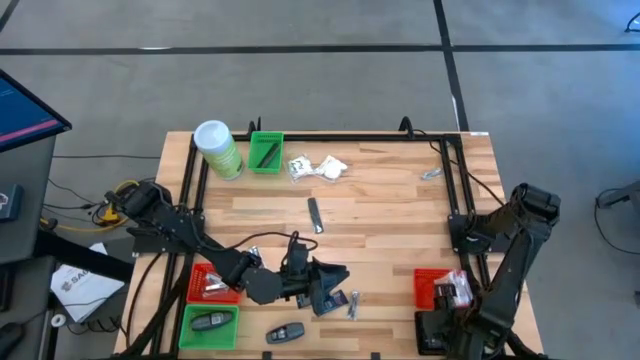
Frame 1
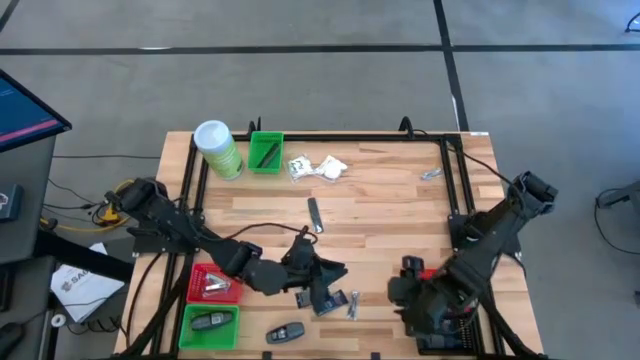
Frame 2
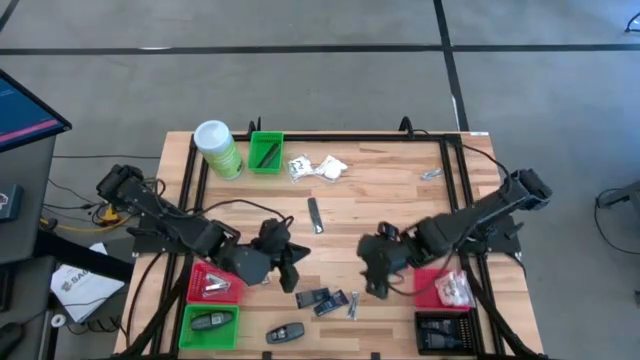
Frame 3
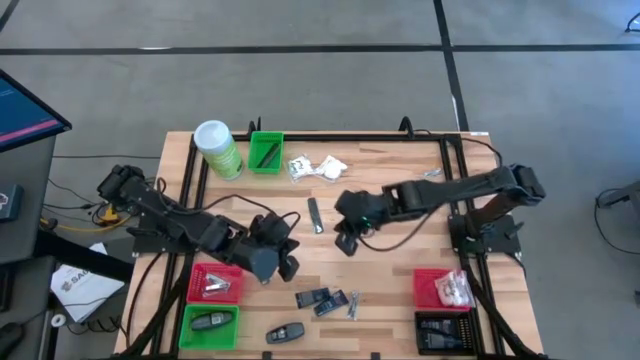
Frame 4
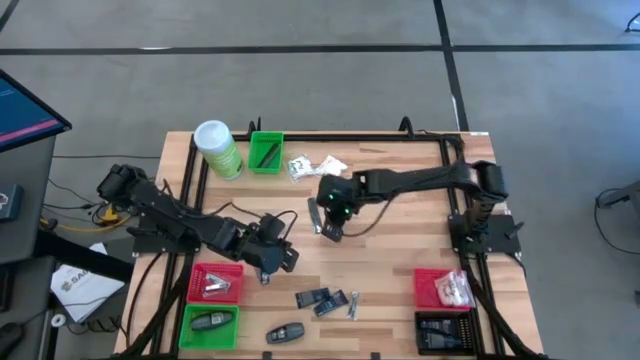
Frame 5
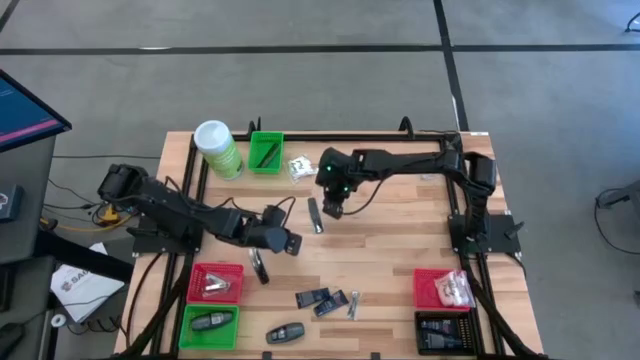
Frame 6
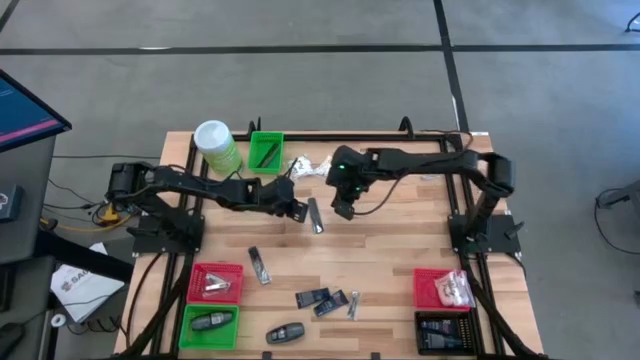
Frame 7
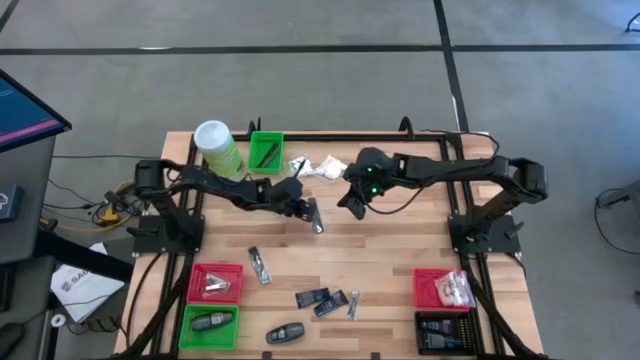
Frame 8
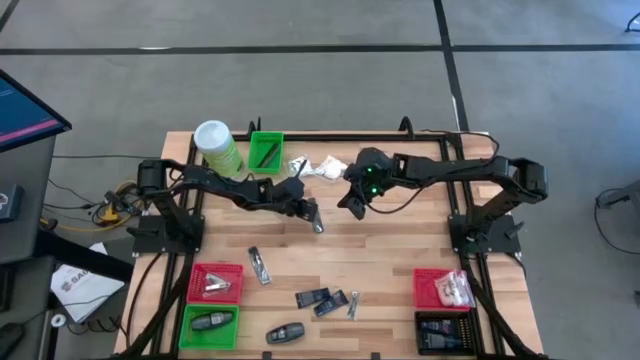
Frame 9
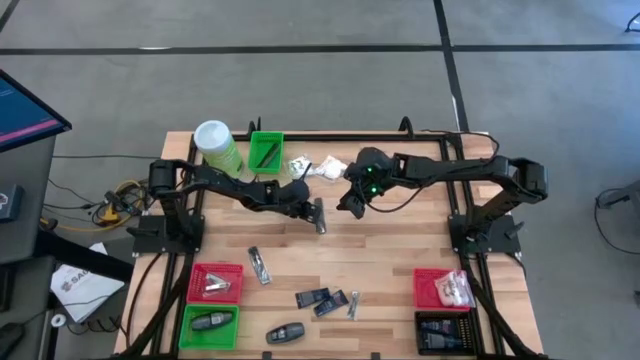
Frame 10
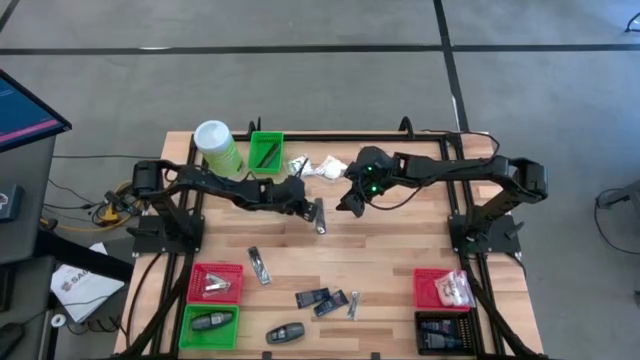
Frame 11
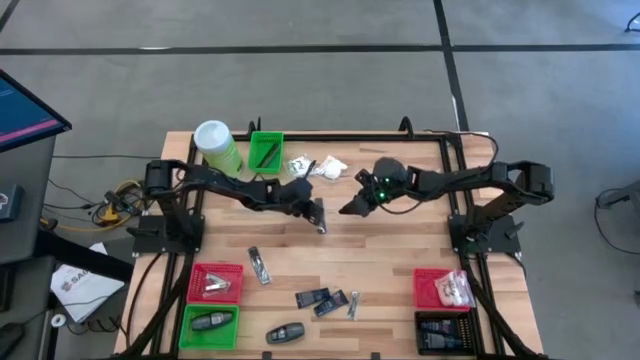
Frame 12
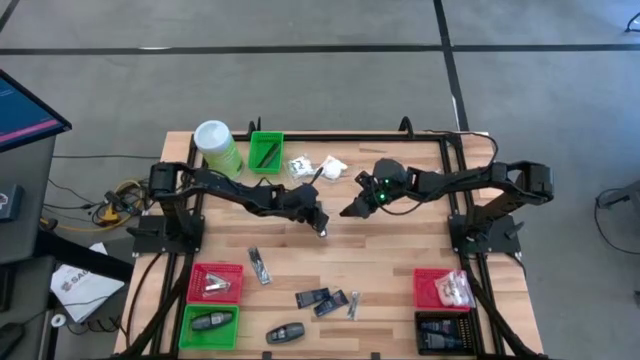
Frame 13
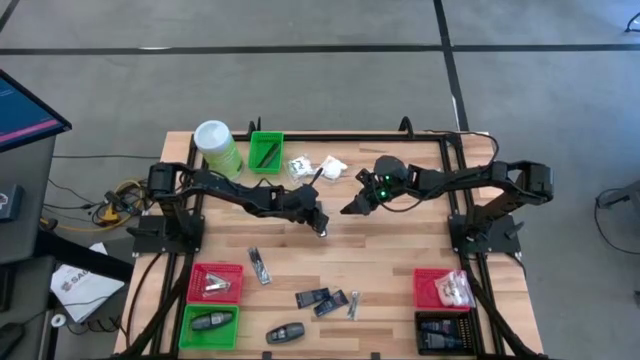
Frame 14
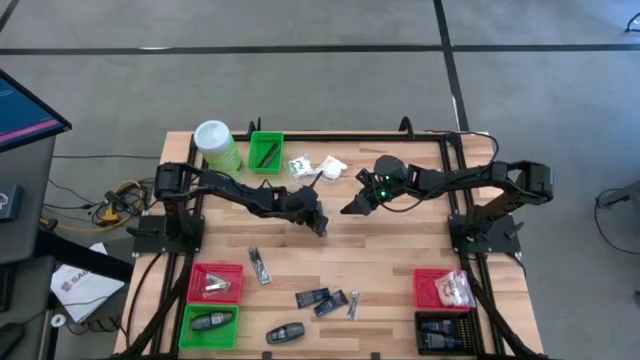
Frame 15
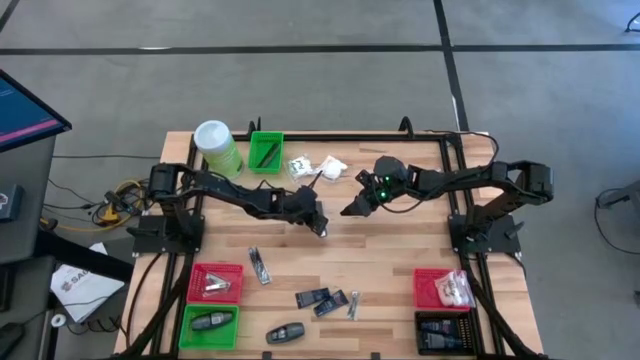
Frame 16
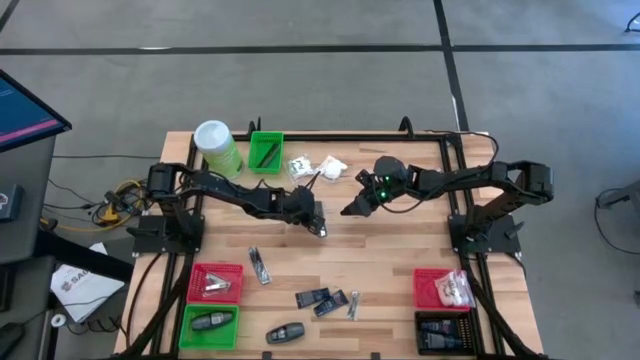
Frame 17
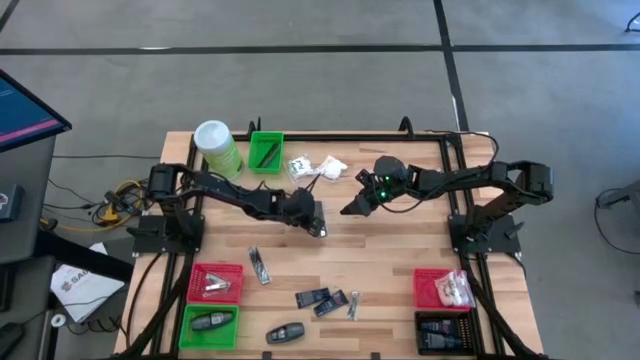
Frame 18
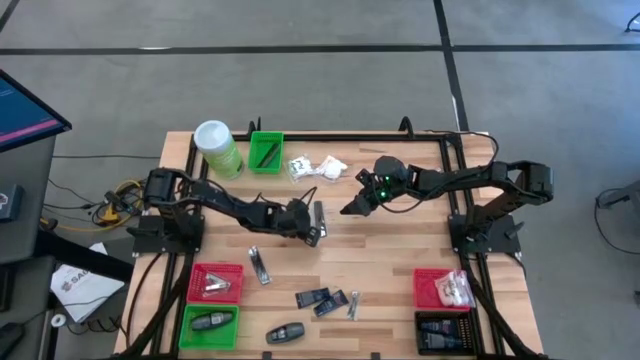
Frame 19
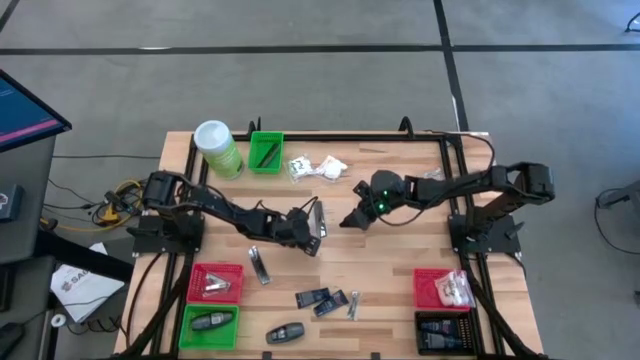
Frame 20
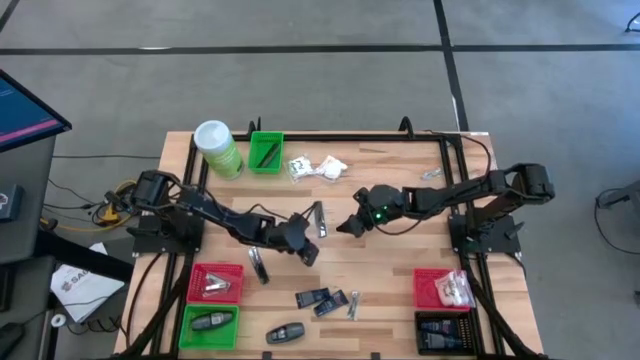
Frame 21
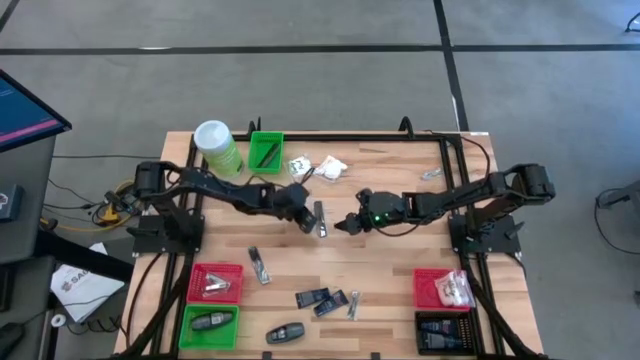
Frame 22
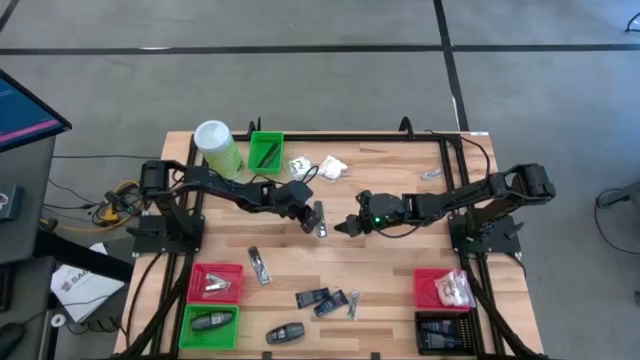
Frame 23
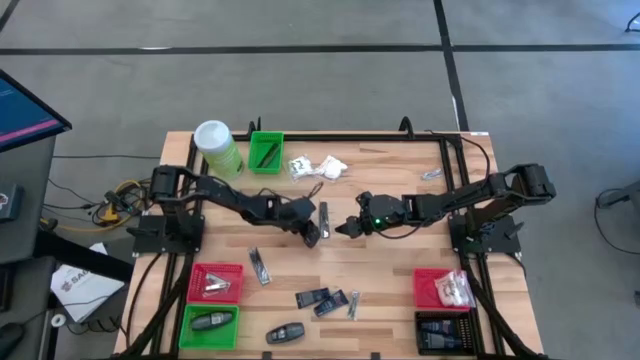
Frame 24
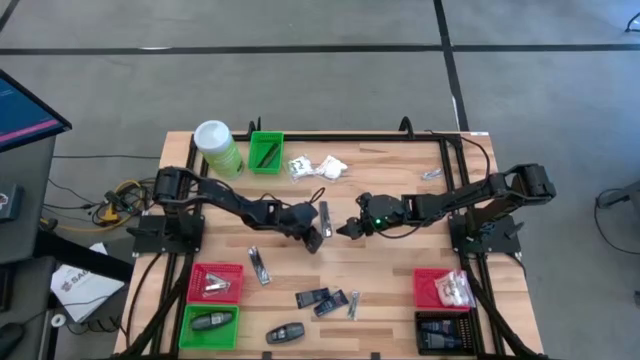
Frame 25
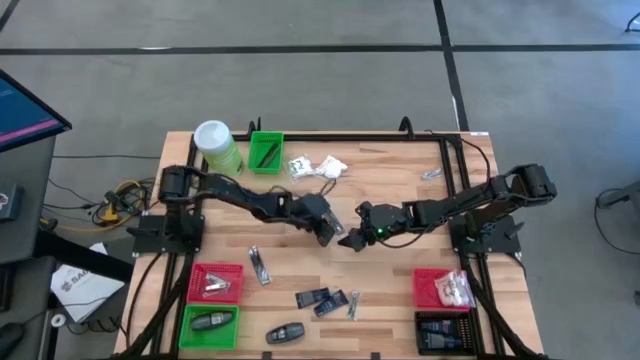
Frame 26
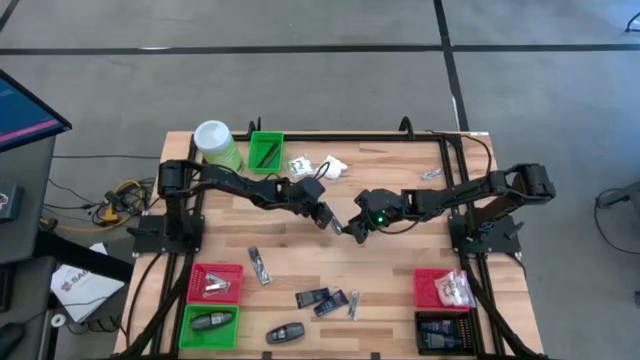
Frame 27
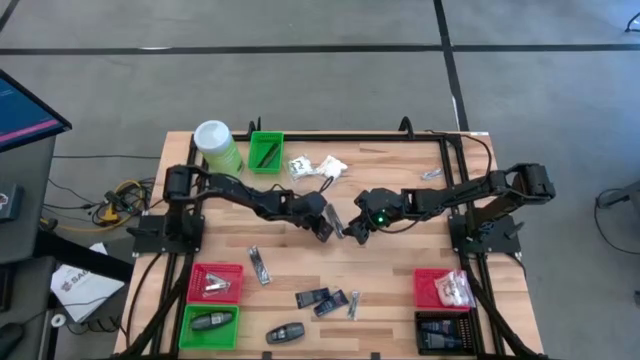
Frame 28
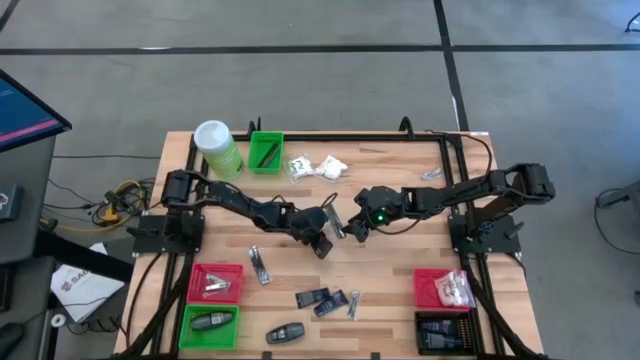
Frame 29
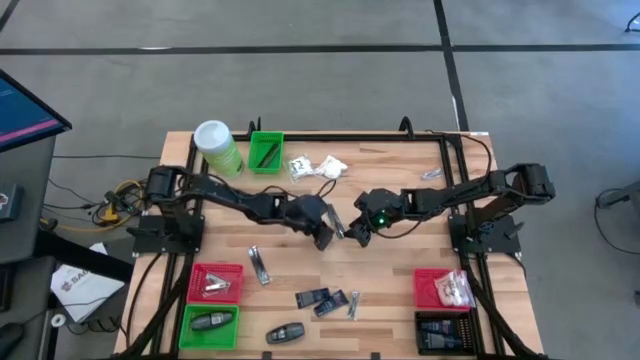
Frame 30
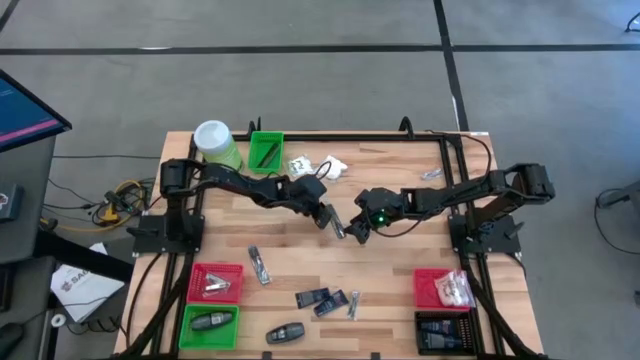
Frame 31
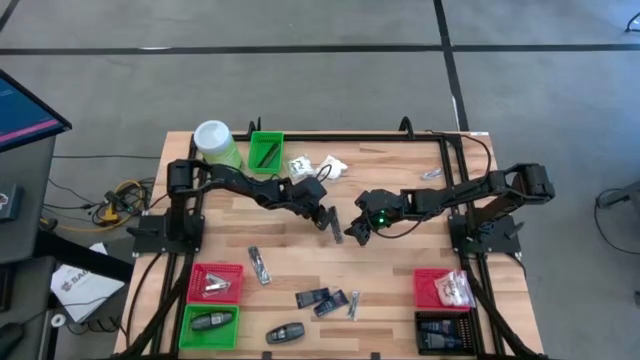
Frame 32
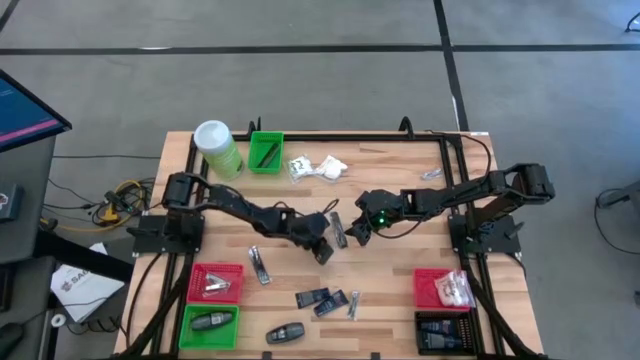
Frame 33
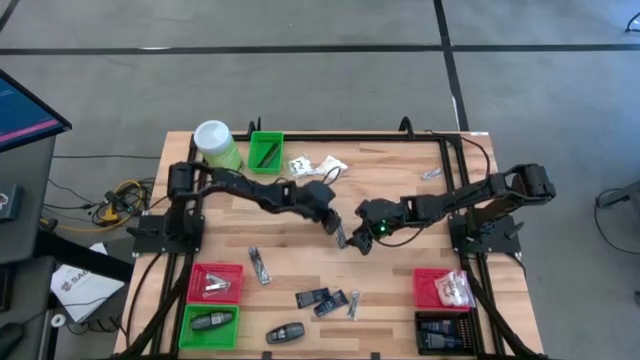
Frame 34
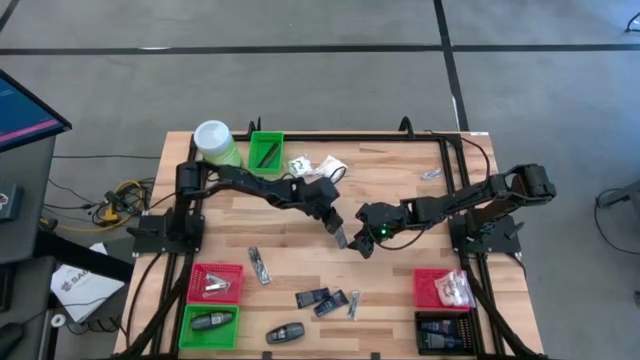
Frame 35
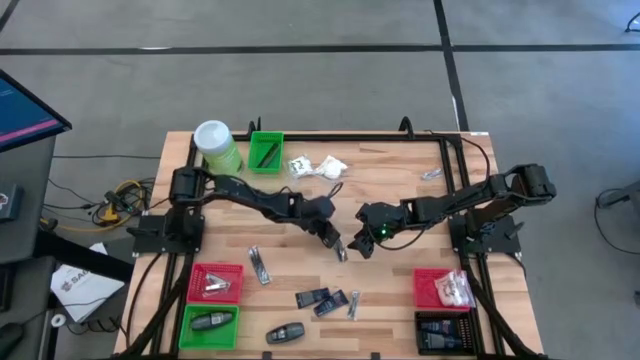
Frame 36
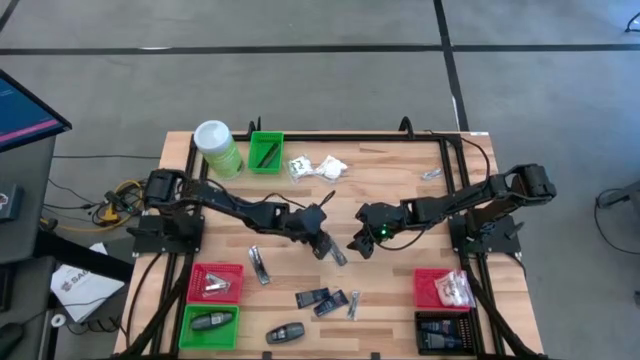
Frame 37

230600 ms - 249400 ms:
Task: Pick & Place Travel size toiletries
Put the black comb into the top green bin

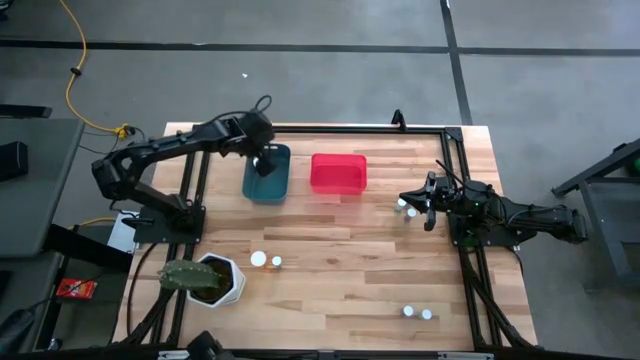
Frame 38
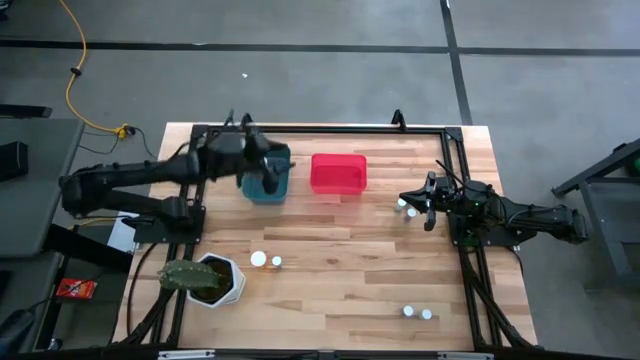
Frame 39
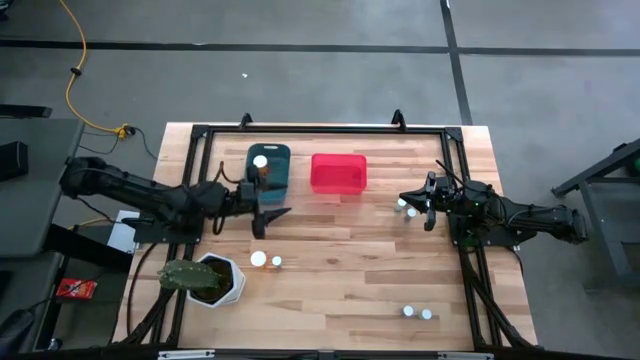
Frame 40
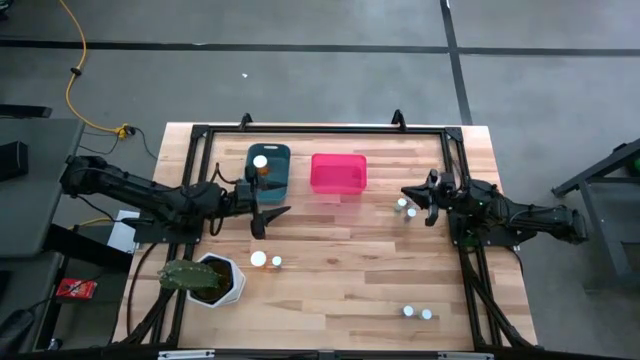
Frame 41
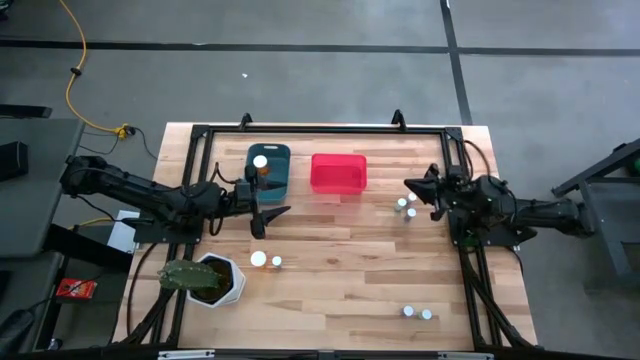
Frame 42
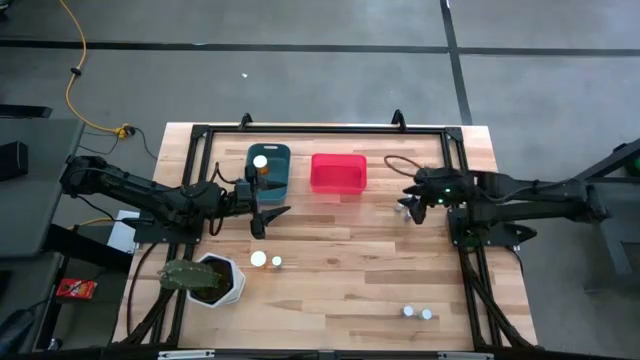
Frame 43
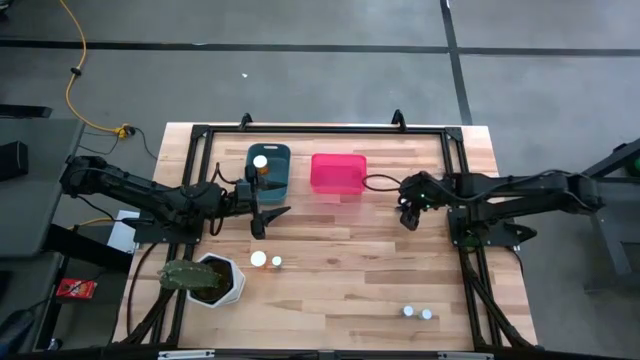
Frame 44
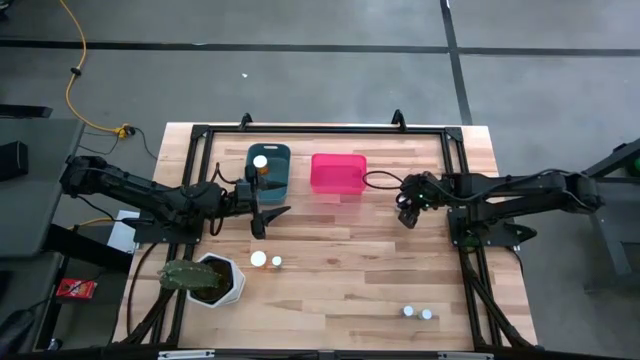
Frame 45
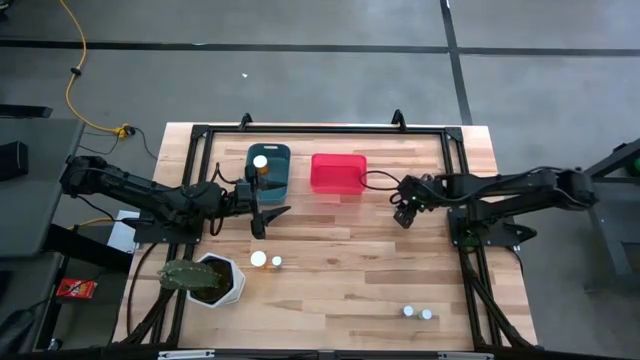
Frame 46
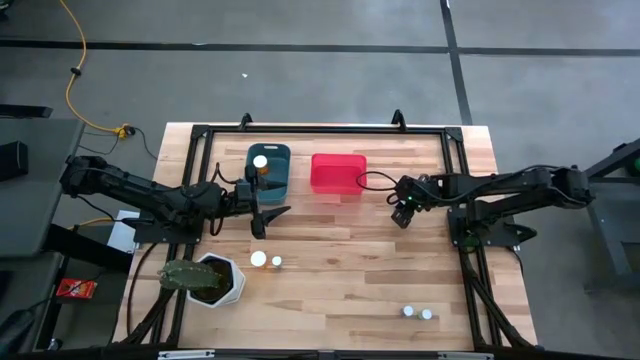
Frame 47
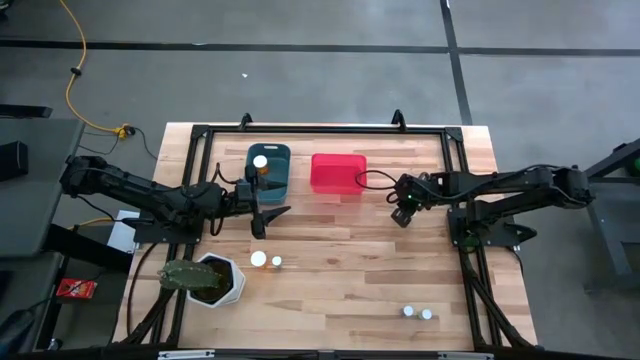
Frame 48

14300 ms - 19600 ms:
Task: Pick and place medicine bottles into bin by pill shape (circle, oval)
Put the top green tablet bottle into the red bin
